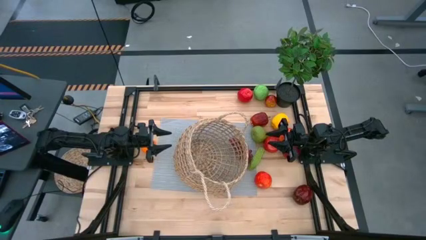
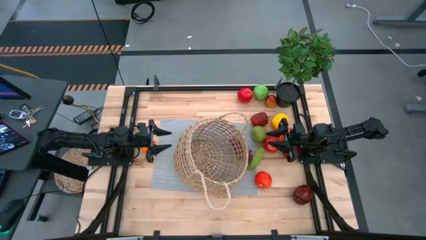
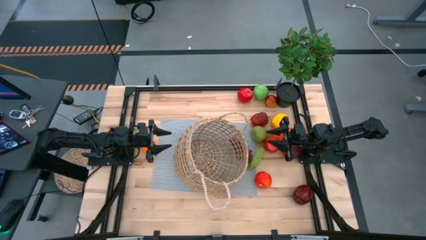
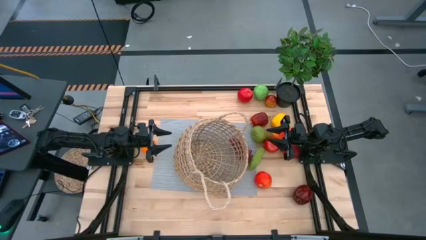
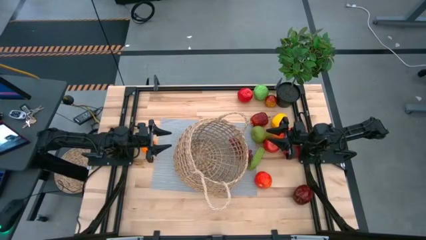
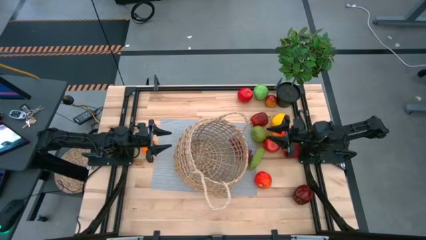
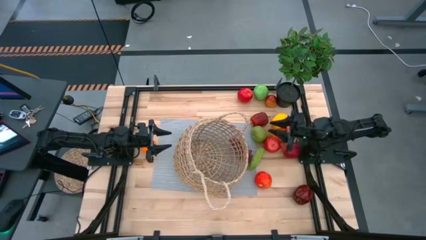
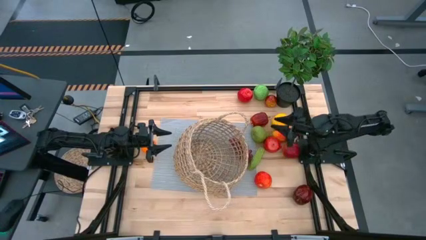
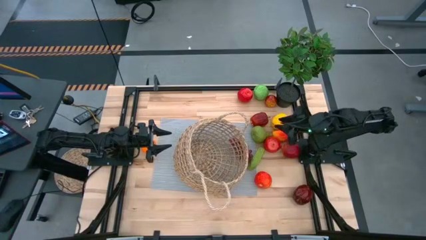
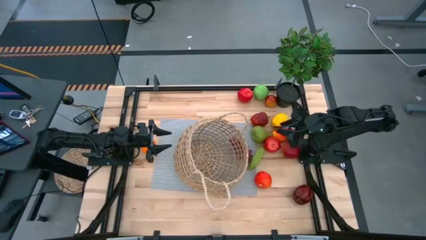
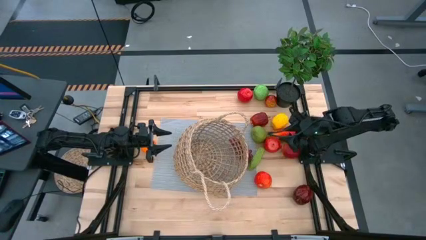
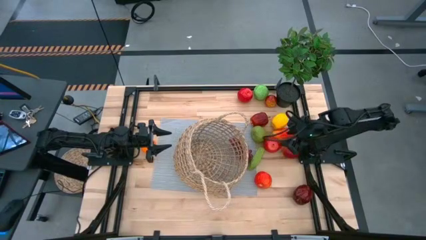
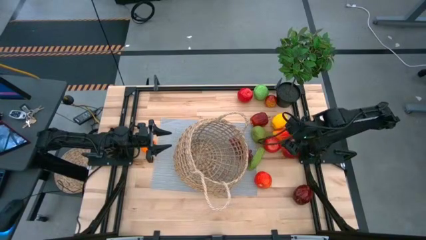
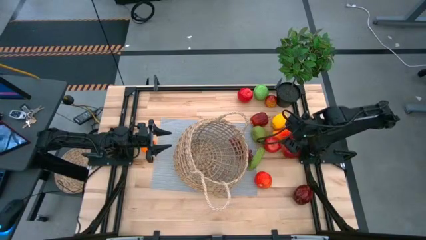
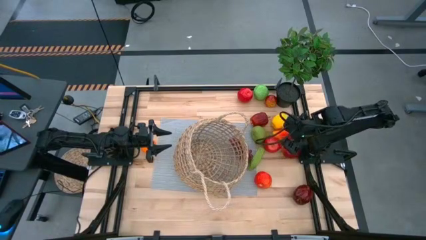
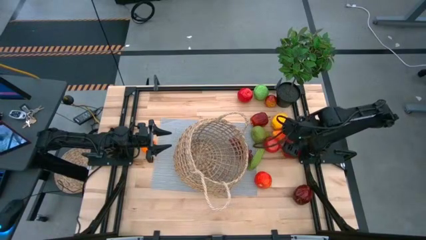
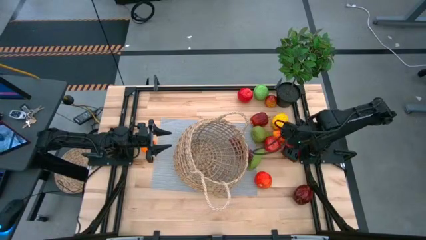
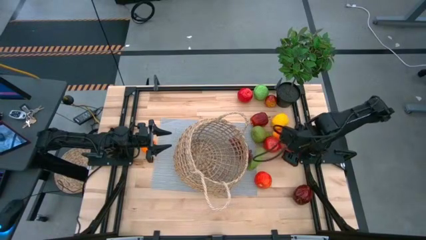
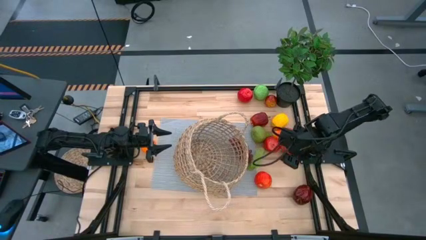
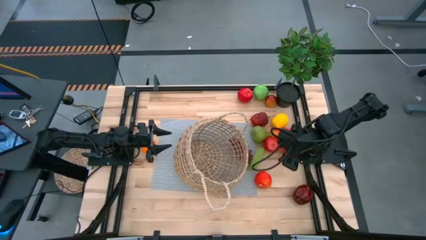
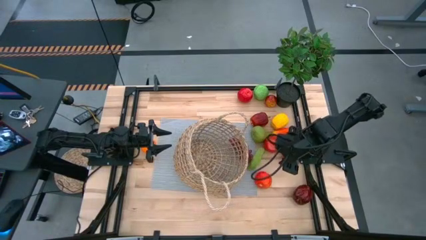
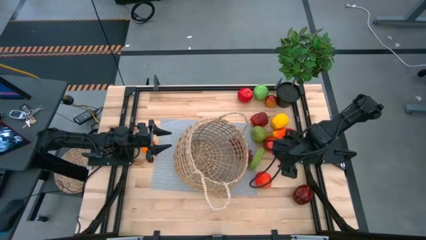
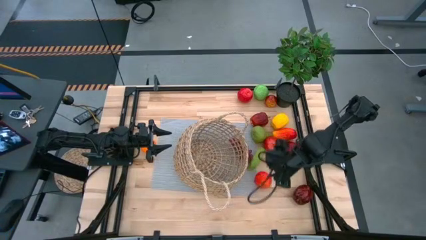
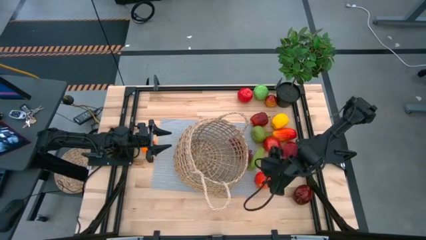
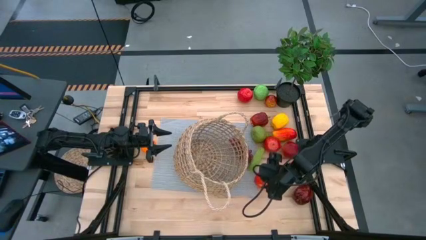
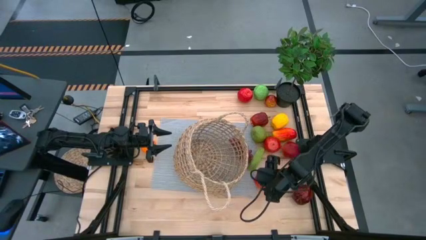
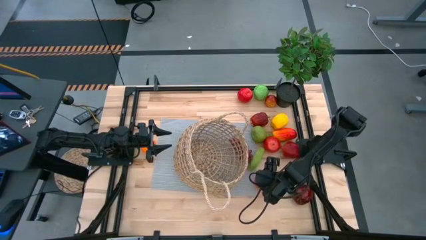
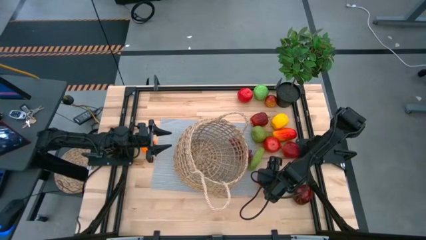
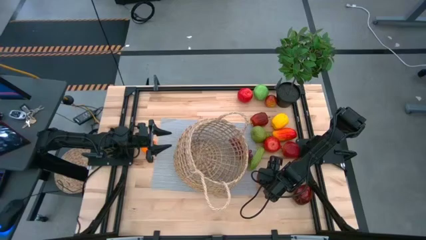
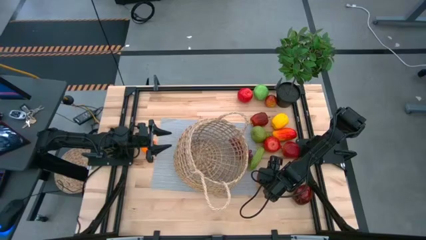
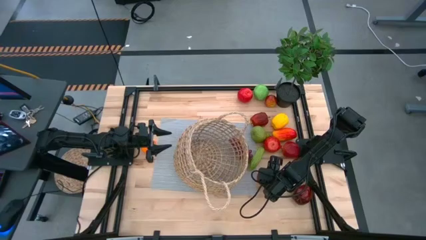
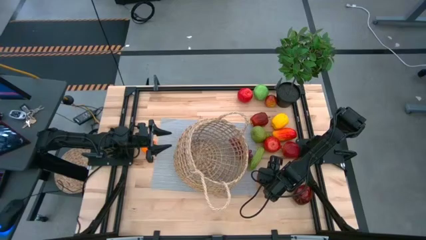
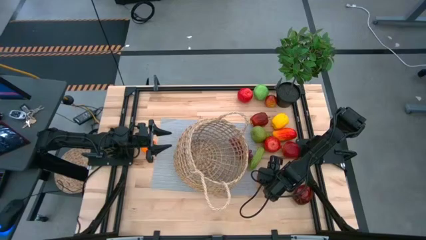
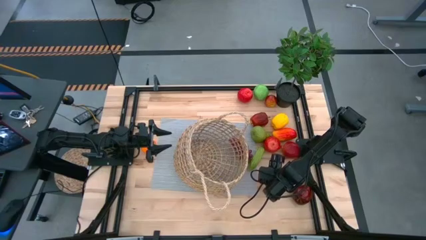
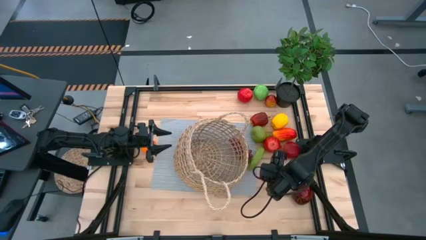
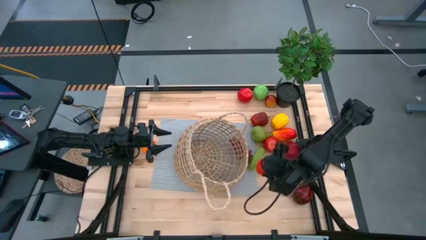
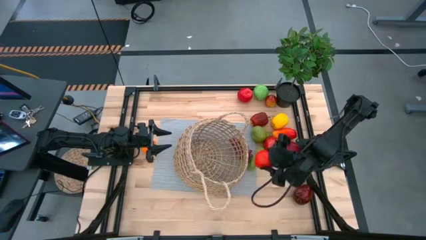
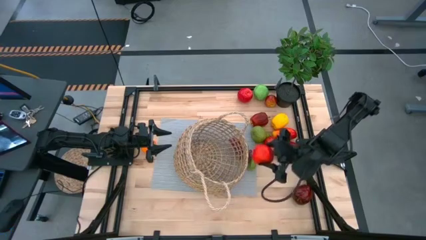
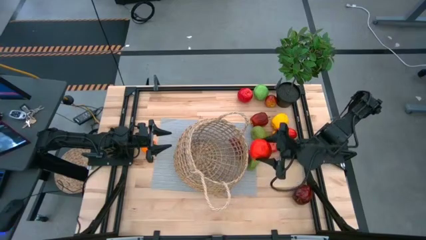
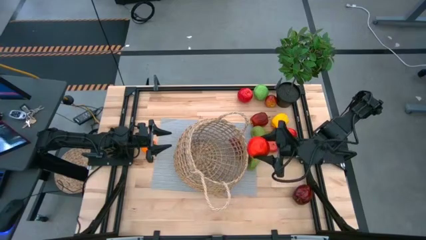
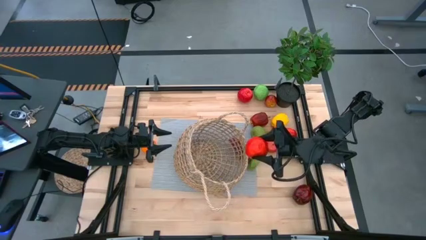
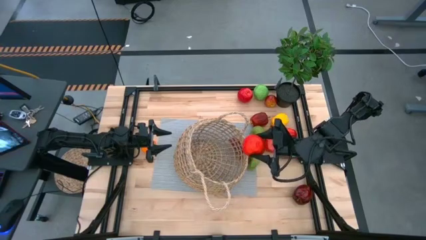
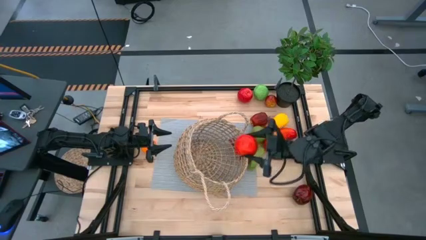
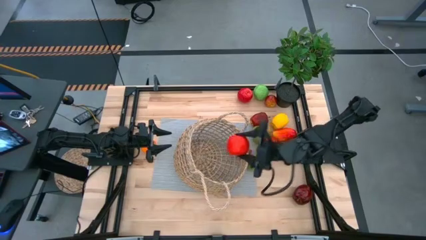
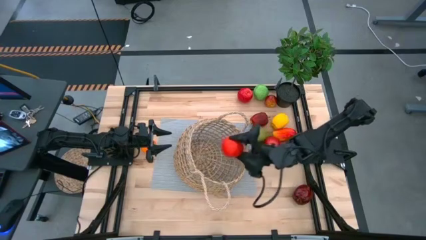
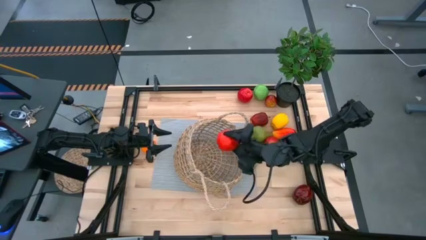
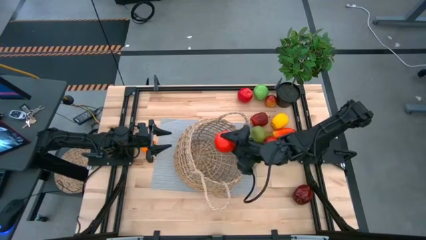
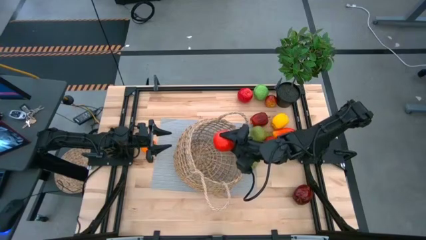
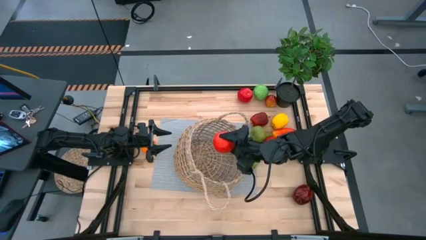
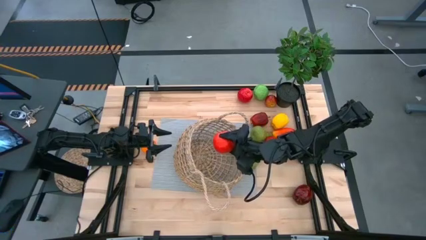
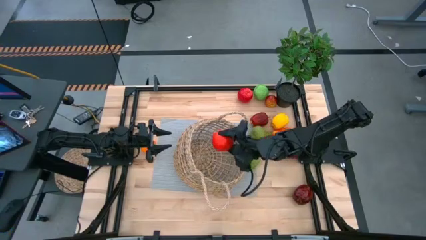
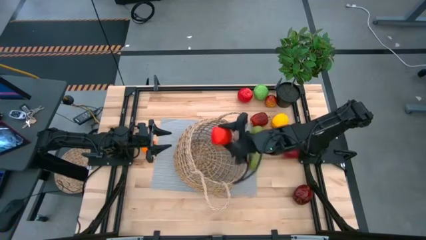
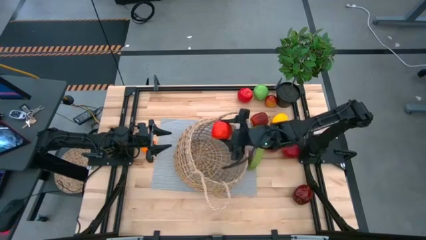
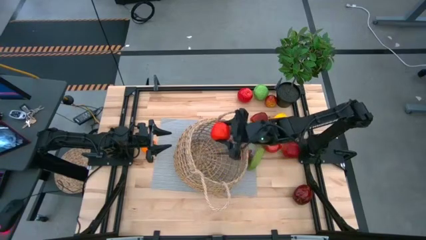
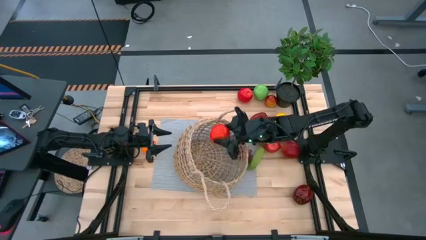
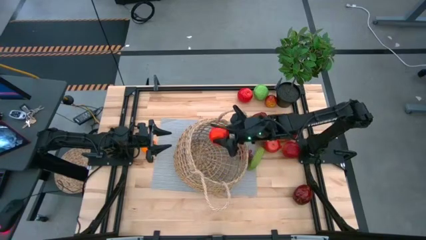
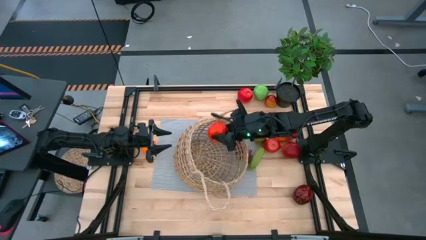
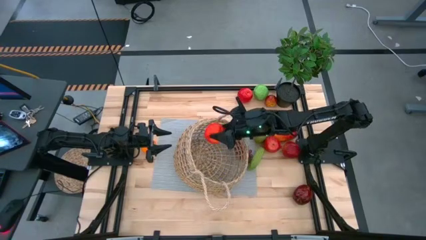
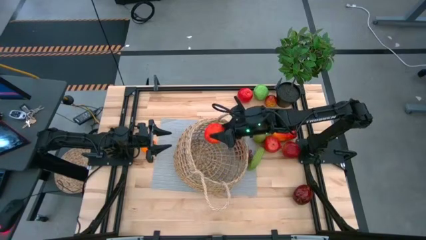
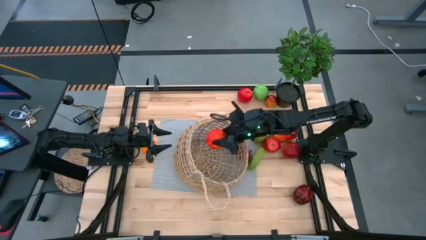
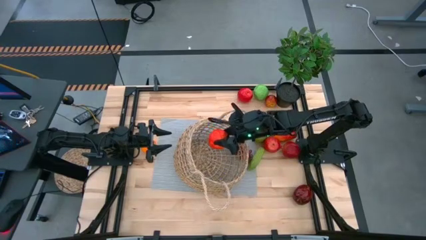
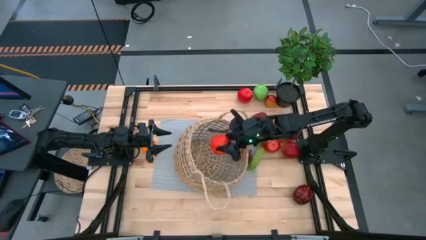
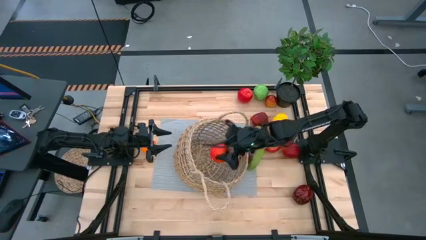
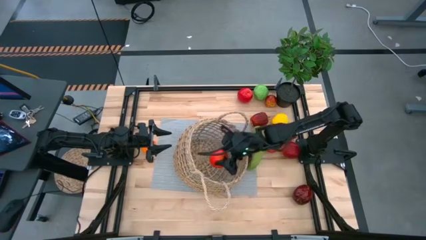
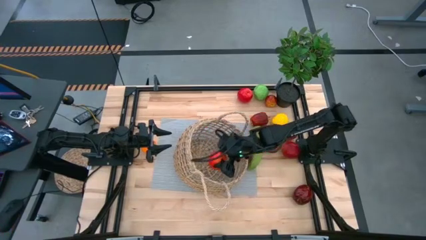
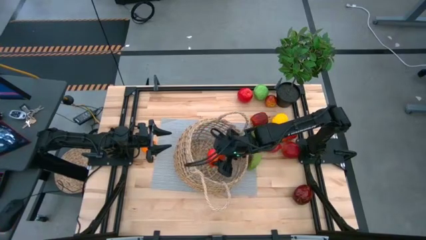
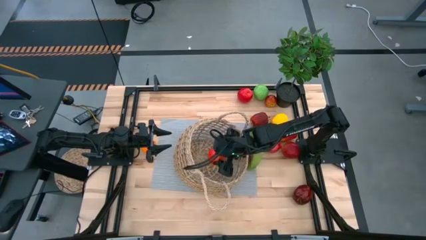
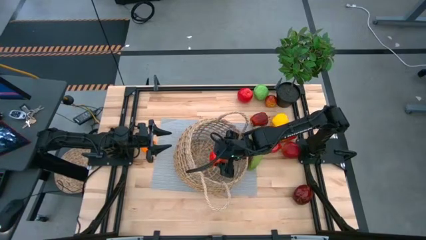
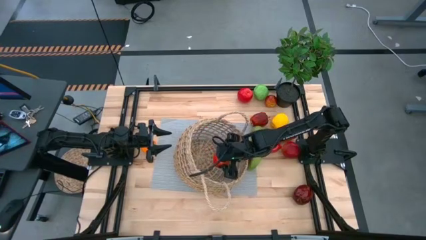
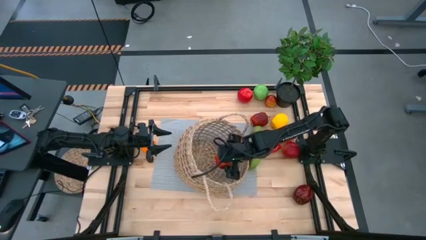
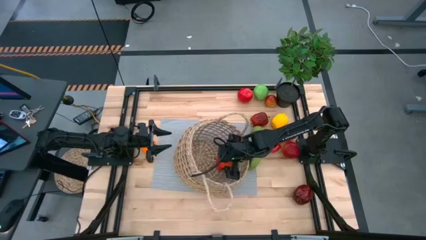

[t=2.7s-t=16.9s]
Task: Build produce basket
Put the apple into the basket
